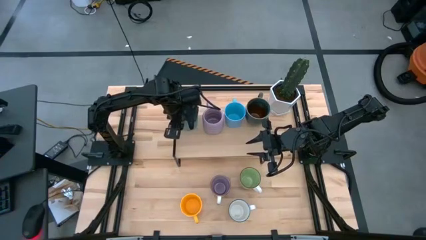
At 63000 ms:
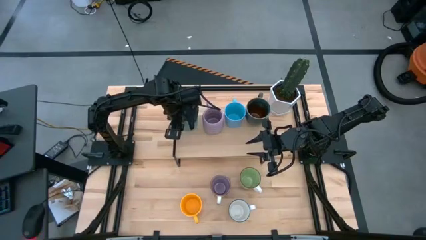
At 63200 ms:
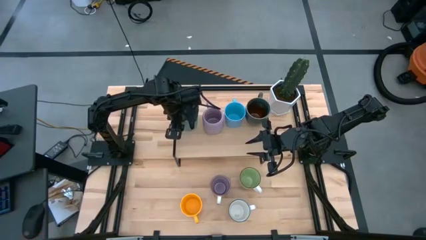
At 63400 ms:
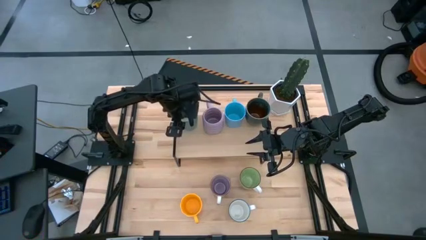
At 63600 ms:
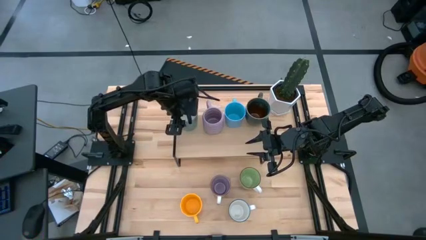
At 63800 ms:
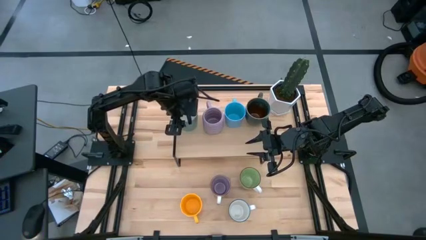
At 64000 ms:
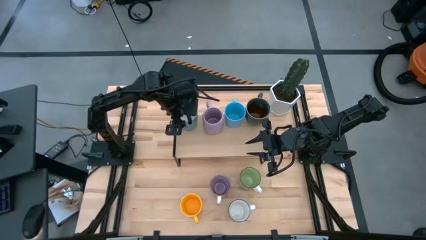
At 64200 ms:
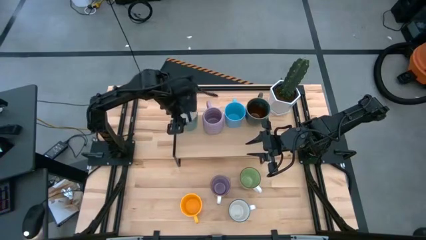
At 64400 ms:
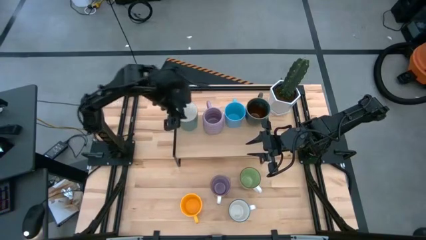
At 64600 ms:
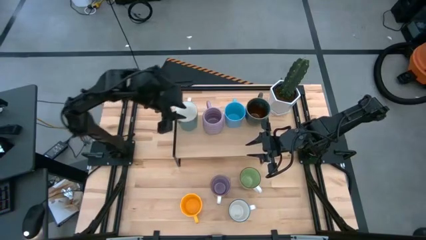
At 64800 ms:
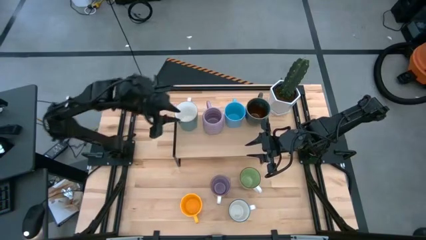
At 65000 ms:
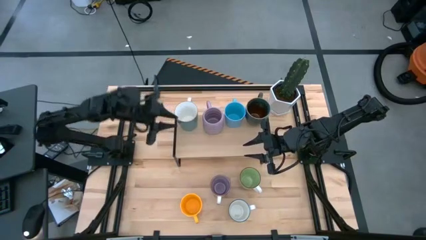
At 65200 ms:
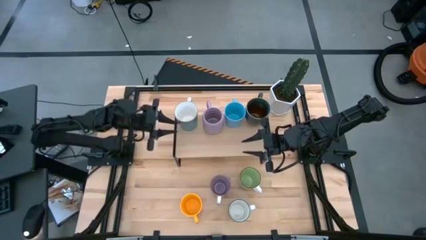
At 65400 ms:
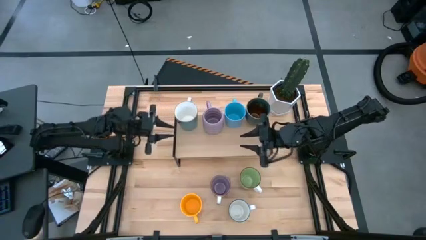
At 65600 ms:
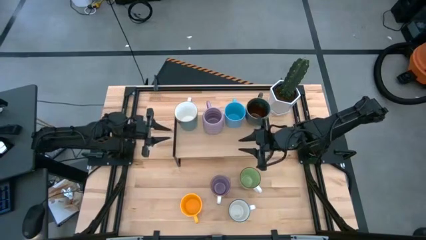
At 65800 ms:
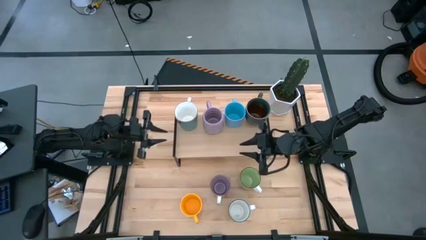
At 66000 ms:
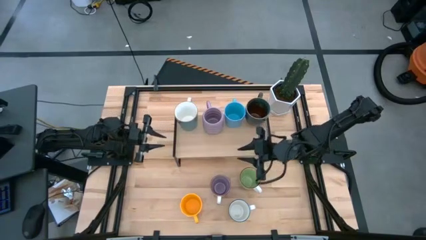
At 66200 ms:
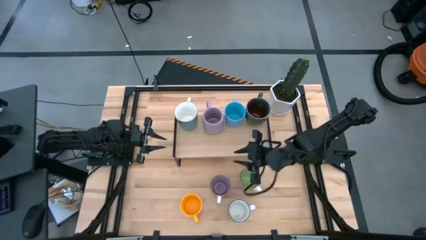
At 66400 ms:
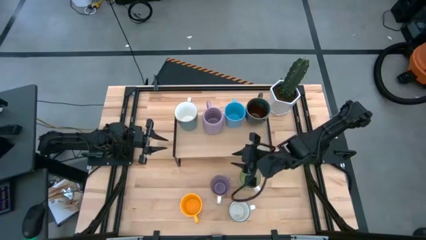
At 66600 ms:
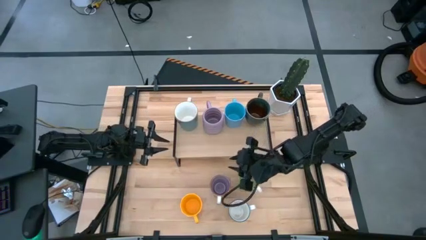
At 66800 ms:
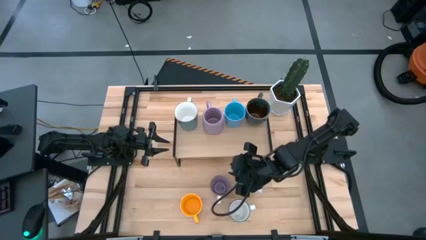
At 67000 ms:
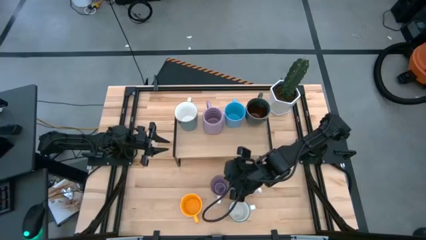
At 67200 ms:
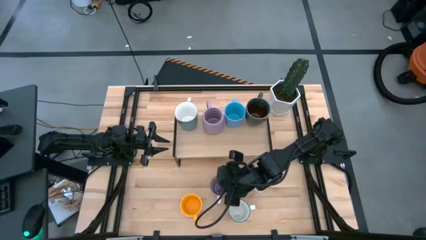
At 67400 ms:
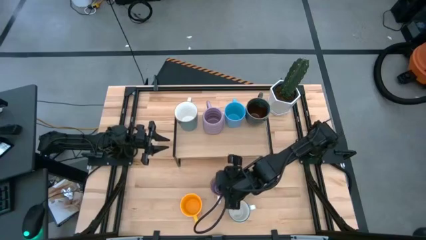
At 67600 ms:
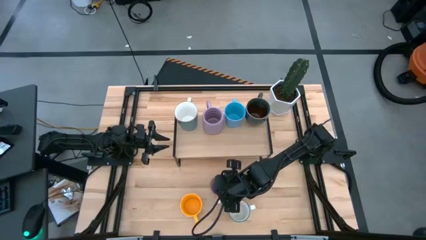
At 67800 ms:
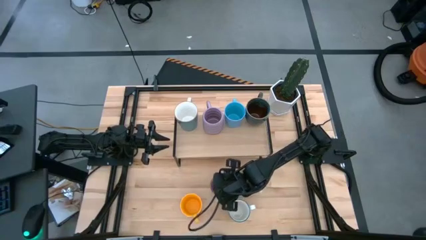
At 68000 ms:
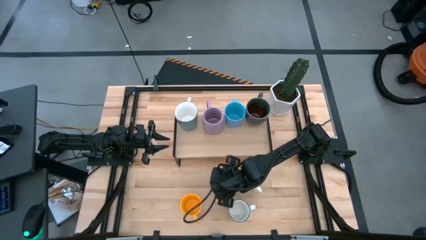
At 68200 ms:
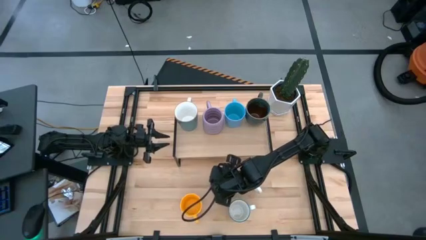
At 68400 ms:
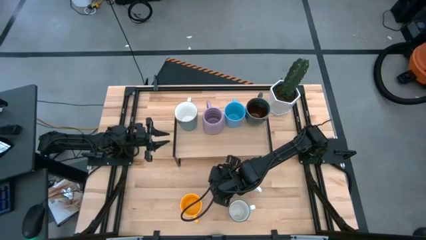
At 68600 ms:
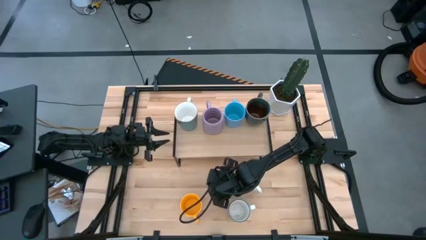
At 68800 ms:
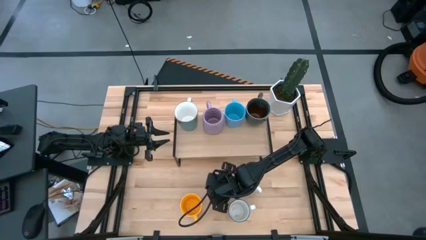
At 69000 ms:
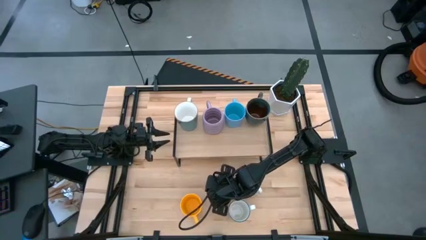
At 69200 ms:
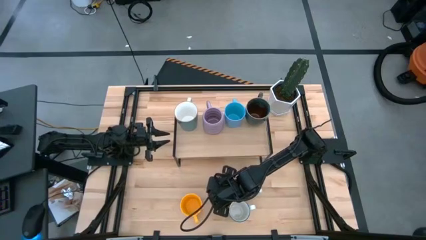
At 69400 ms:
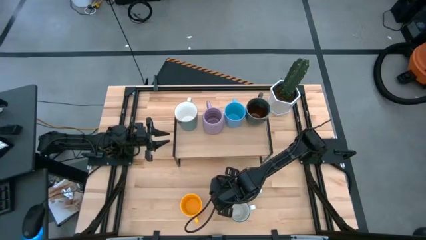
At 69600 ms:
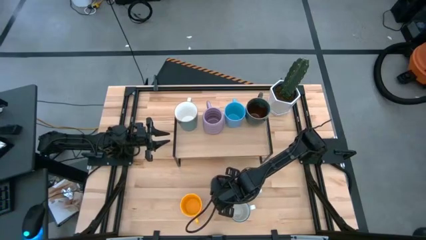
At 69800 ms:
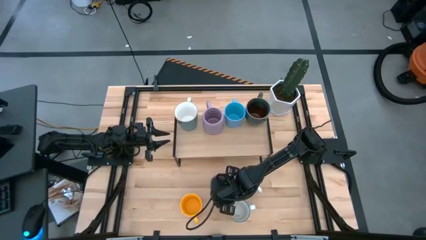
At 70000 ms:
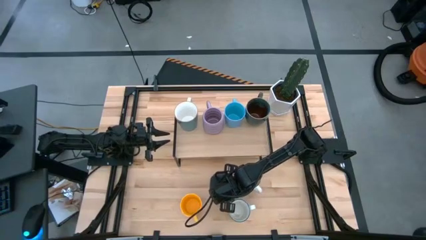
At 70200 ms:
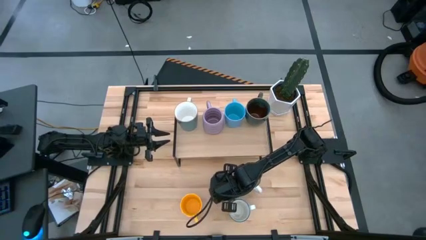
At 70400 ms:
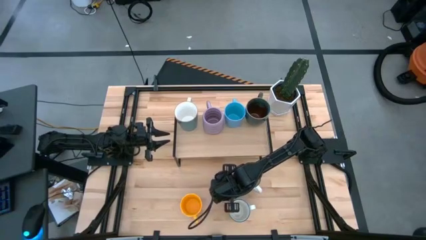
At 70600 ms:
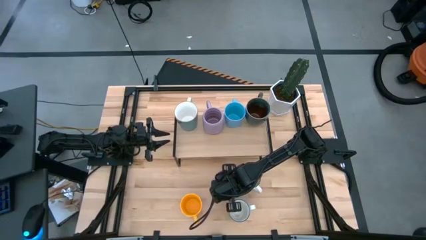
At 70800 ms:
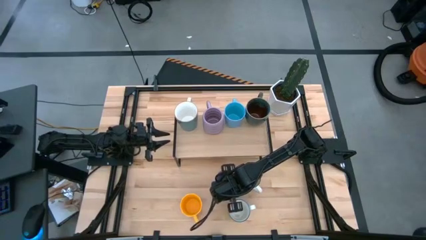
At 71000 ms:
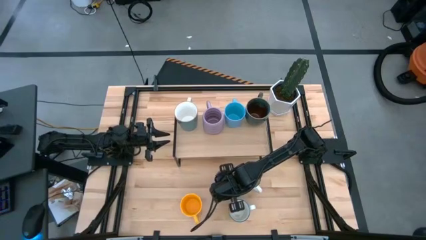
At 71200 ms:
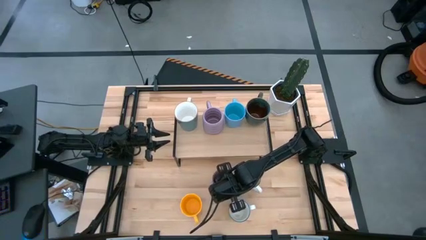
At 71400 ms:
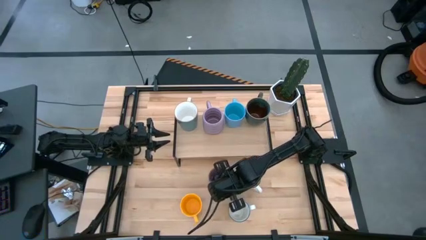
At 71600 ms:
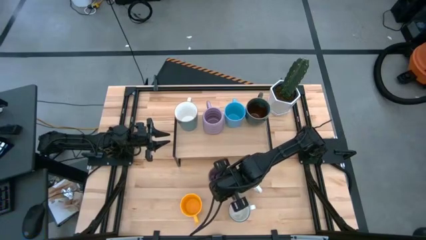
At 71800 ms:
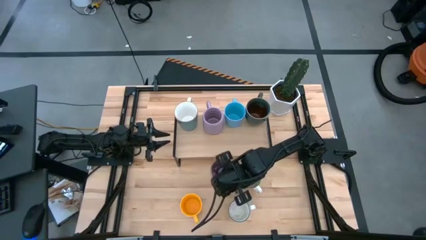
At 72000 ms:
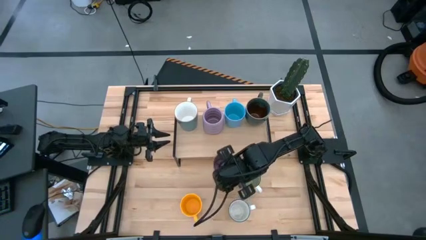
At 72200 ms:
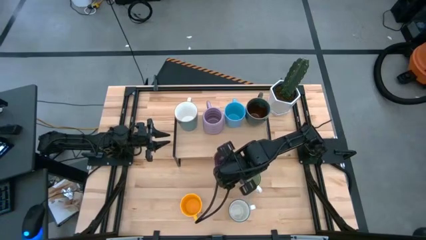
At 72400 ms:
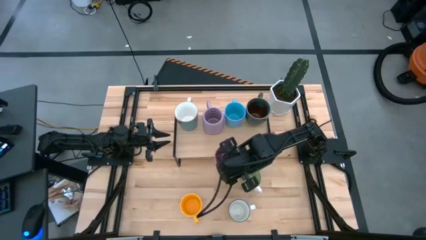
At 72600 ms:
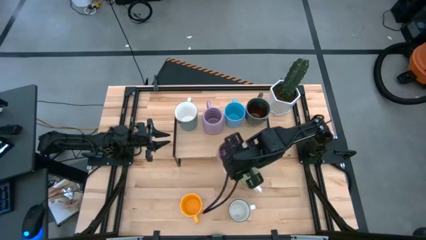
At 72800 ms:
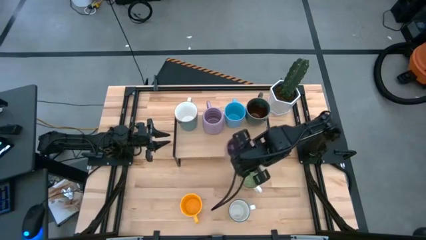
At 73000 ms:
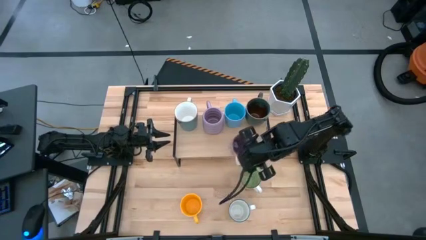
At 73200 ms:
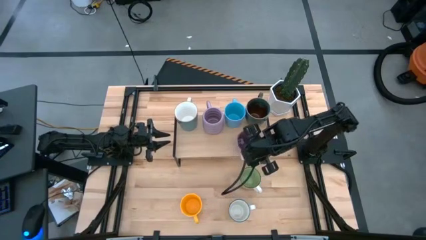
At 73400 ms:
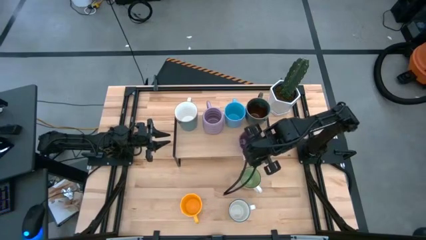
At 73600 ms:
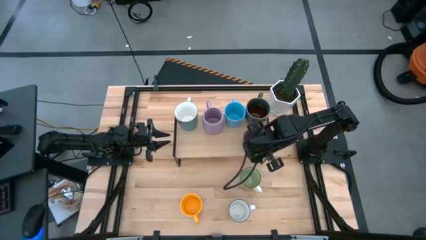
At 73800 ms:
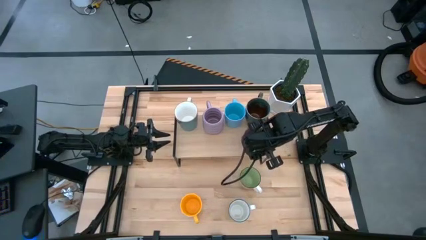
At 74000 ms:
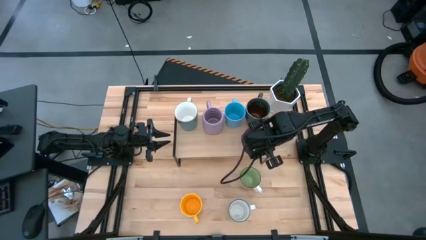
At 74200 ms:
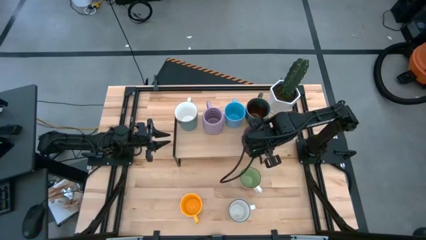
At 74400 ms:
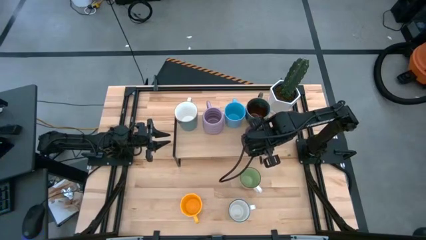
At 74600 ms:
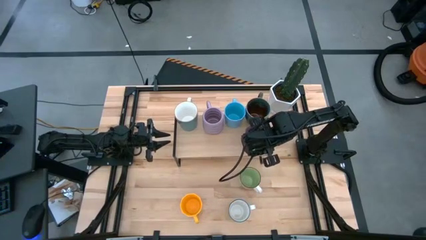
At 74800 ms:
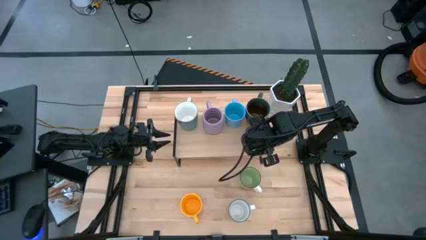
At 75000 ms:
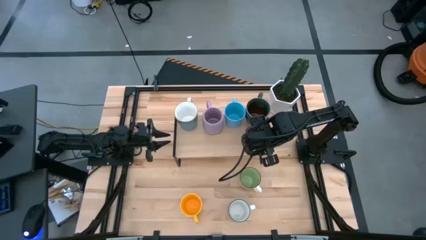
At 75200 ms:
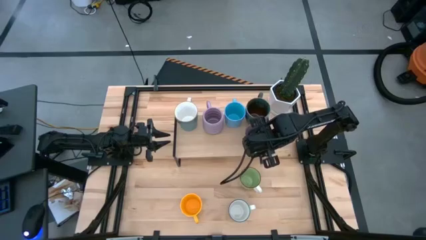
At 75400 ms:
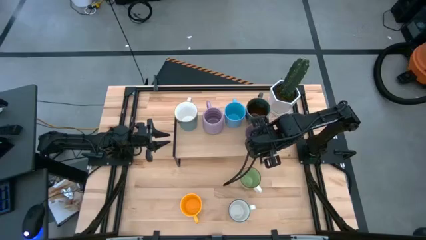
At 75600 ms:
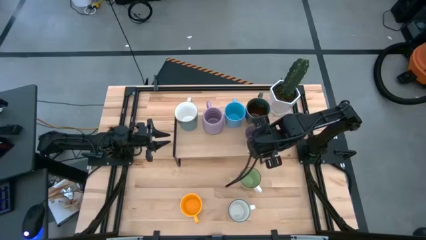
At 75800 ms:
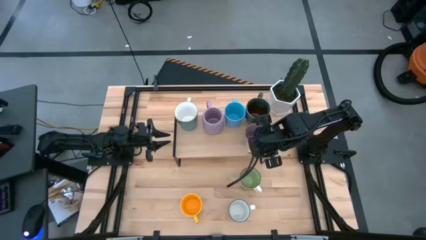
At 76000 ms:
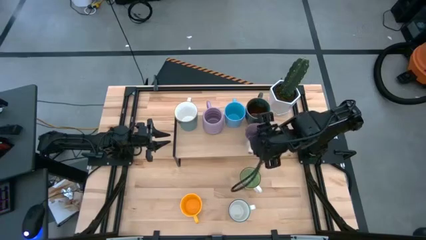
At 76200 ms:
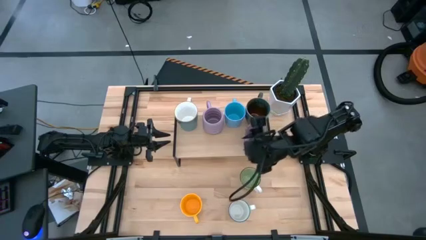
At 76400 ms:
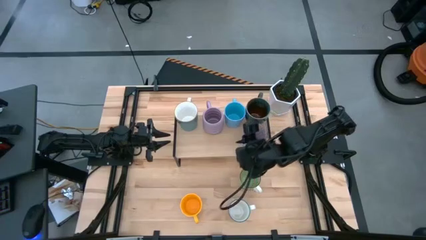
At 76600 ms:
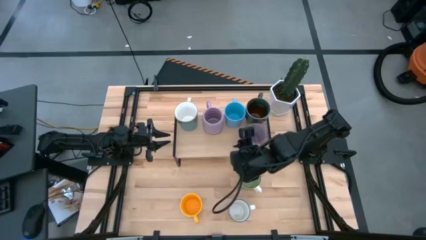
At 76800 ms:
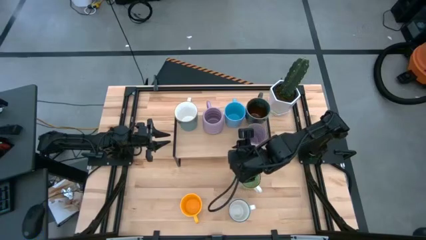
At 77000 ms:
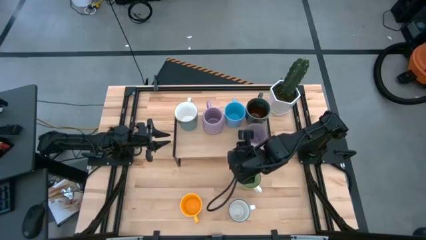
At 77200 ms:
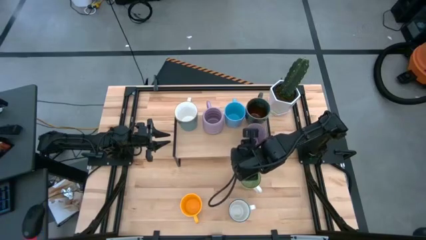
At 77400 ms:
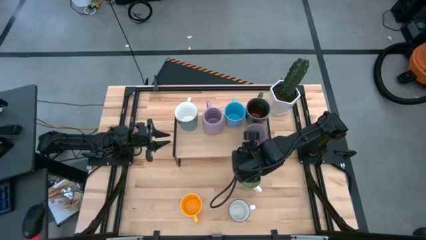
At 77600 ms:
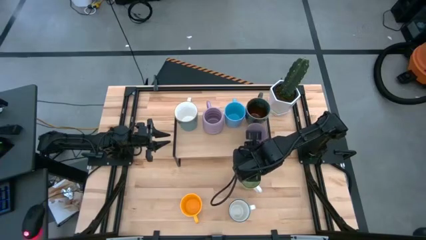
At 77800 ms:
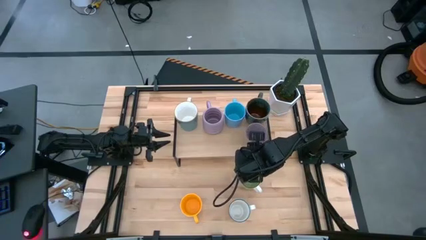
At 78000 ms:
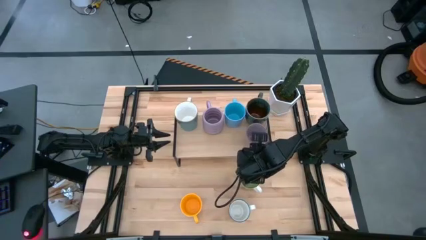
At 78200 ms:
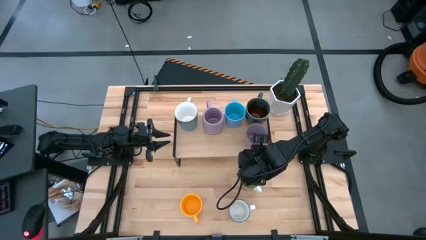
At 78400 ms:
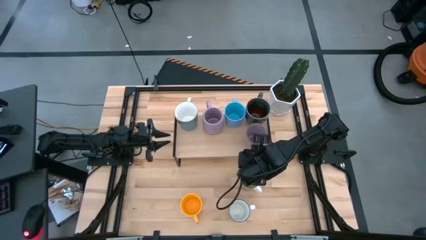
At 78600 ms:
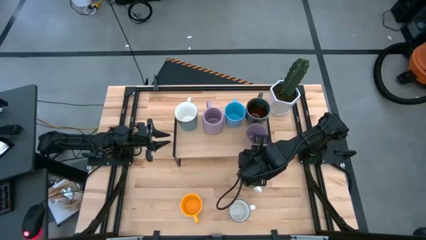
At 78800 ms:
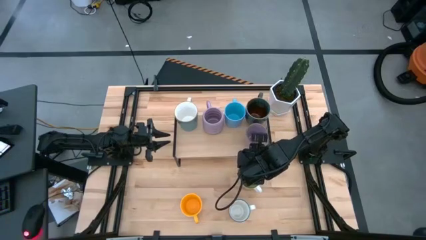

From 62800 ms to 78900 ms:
Task: Place coffee mugs
Put the purple mug on the shelf
